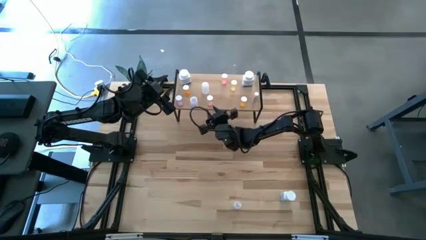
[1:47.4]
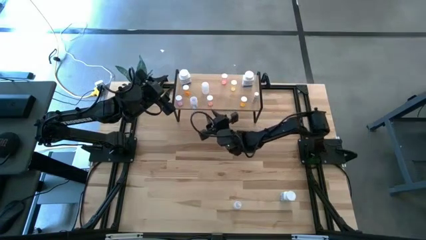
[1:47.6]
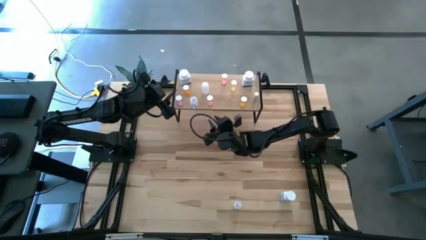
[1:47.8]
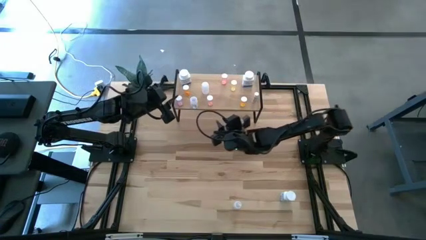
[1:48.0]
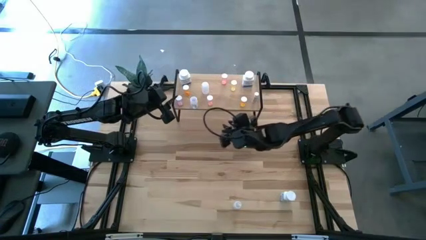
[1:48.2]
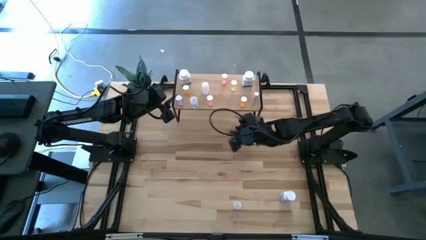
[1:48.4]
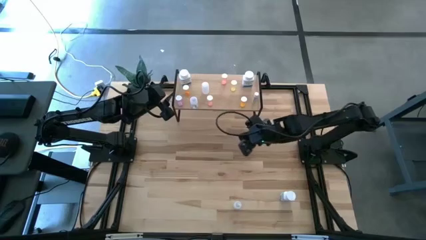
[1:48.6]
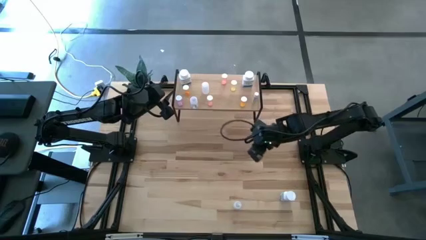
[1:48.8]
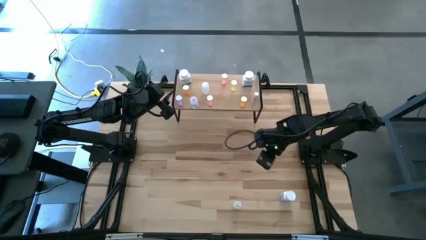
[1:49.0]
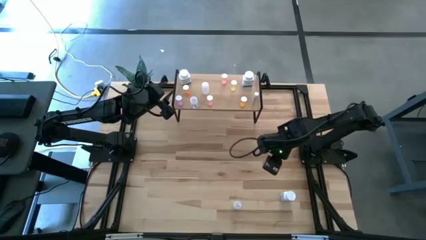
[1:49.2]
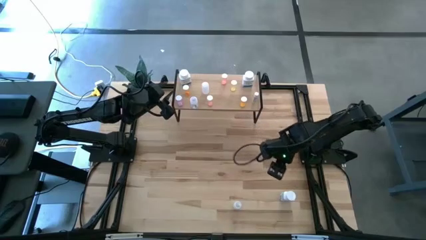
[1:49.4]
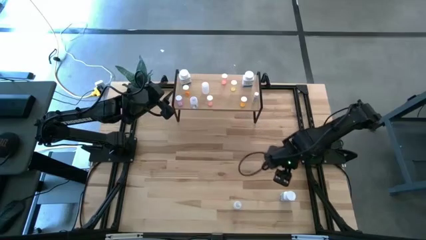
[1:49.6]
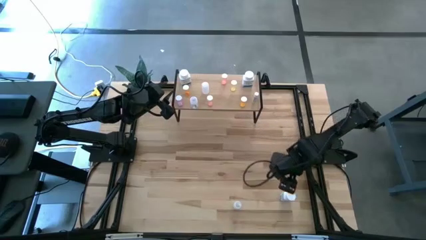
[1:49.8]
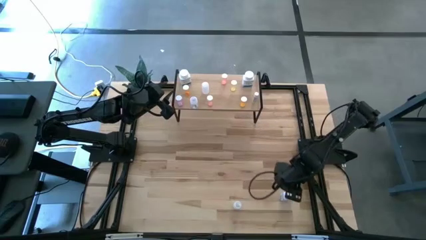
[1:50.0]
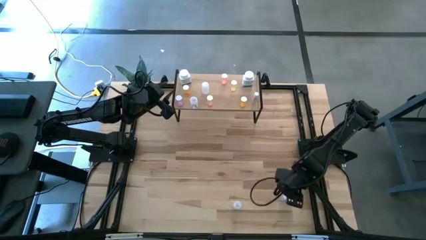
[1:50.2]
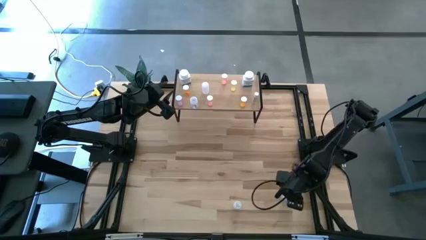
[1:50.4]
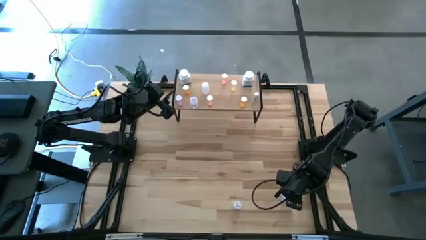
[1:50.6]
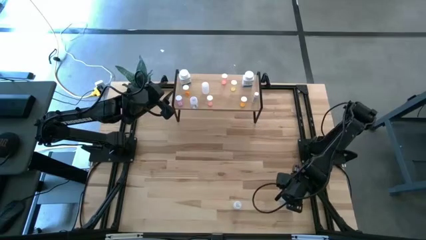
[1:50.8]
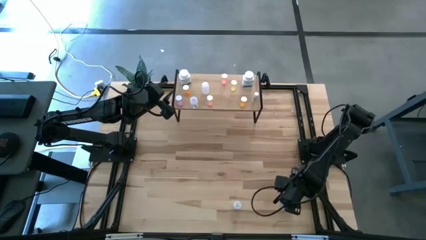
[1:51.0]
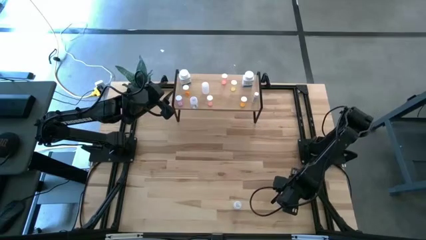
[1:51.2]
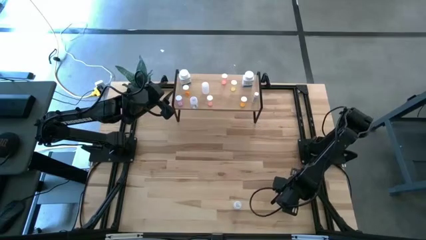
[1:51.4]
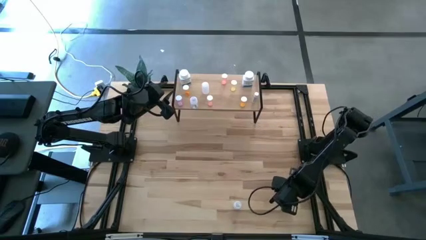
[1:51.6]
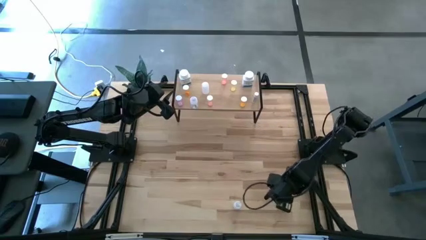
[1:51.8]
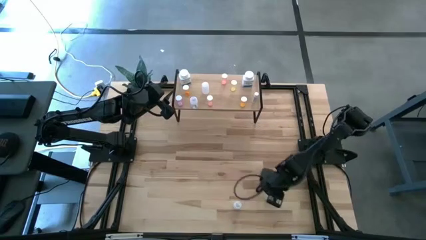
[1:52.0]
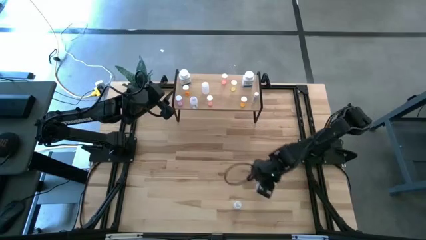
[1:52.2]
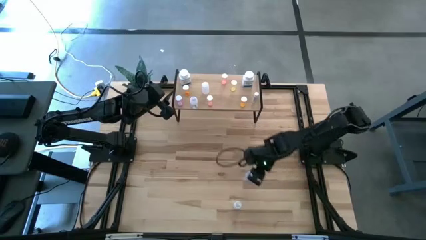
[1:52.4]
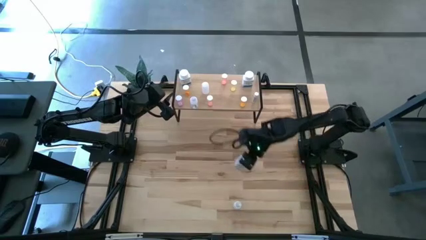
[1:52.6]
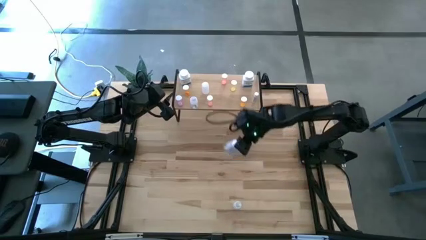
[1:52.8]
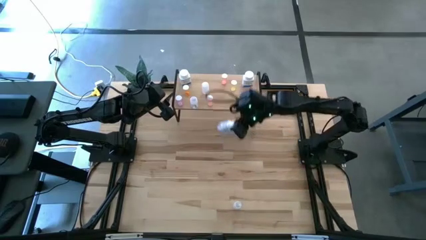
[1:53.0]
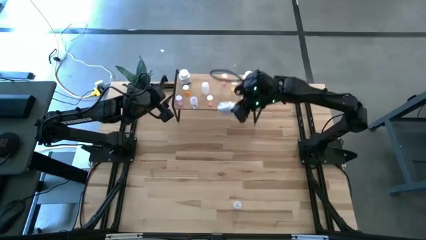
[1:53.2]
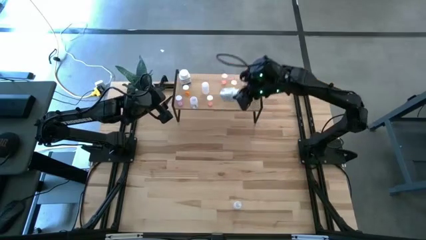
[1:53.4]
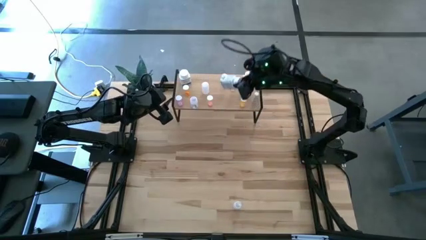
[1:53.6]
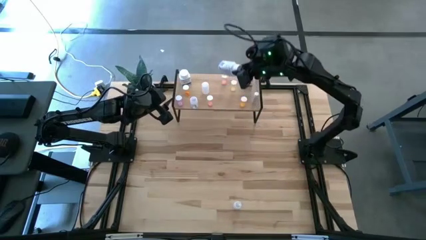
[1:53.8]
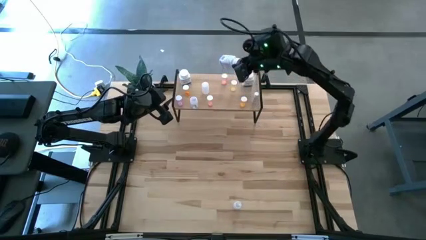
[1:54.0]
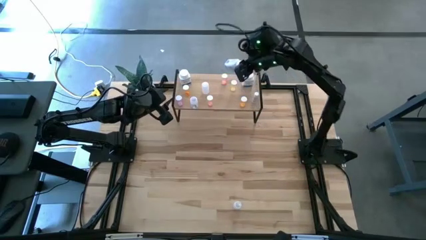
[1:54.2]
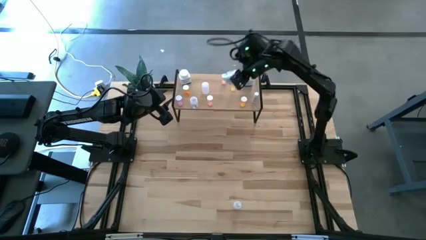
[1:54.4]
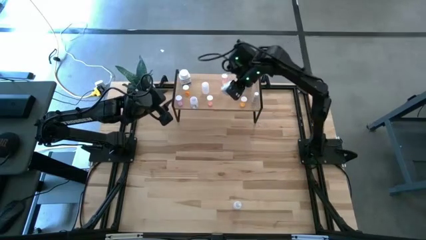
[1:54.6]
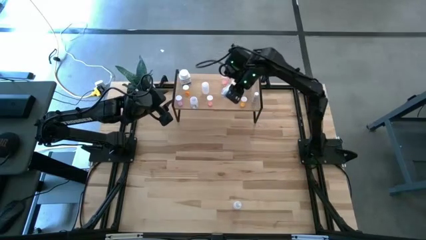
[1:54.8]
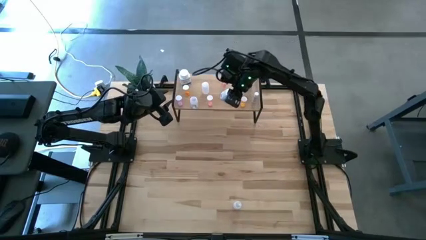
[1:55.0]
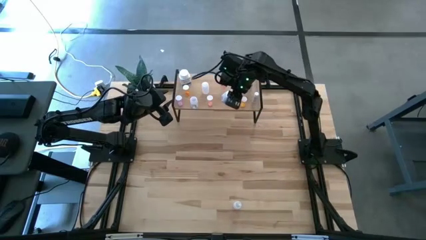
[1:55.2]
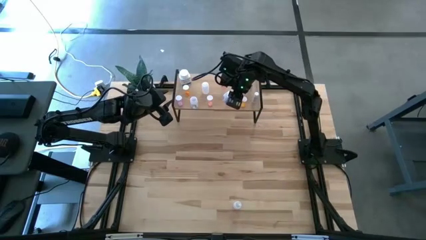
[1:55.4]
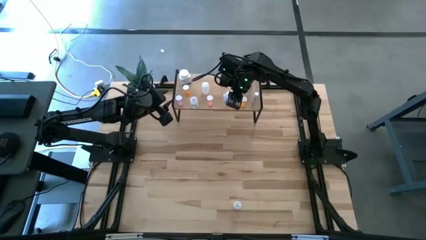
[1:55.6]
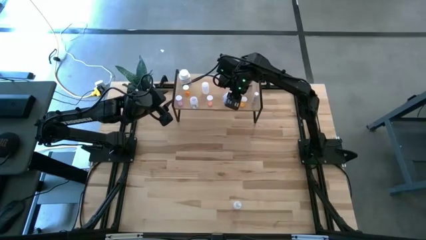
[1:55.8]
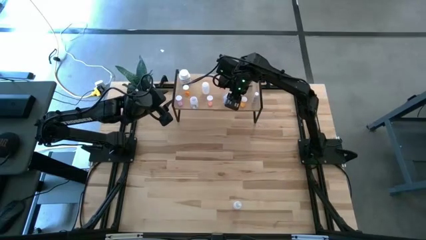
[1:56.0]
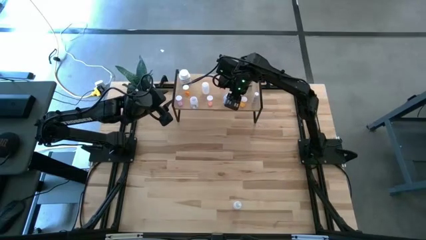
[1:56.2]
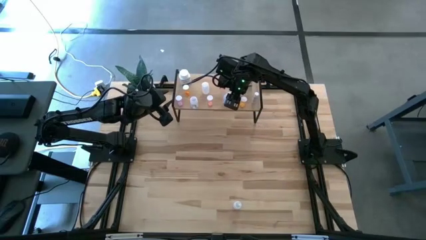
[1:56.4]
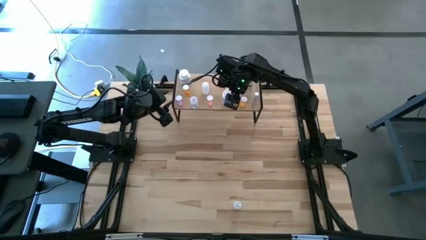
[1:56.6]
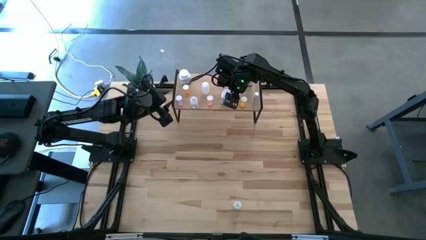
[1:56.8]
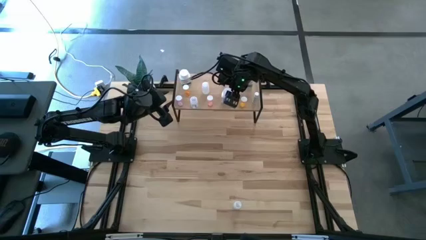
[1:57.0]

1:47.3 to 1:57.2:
Task: Pick and place medicine bottles onto shelf by color
Put the blue pill bottle on the shelf

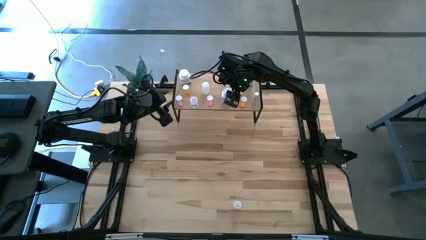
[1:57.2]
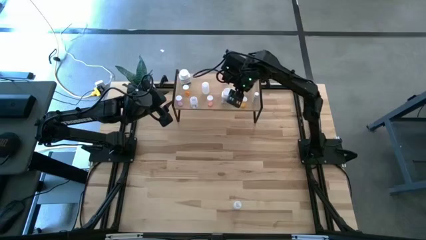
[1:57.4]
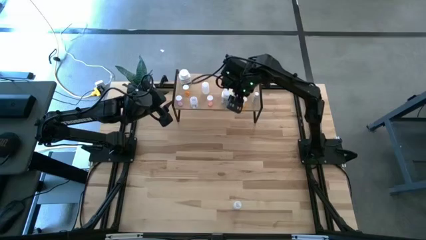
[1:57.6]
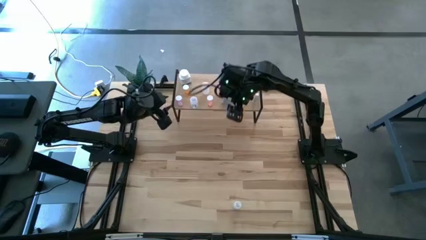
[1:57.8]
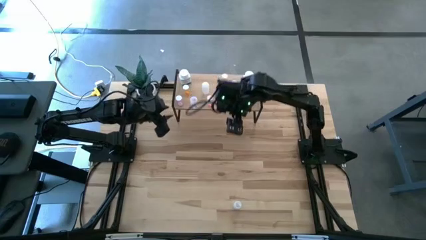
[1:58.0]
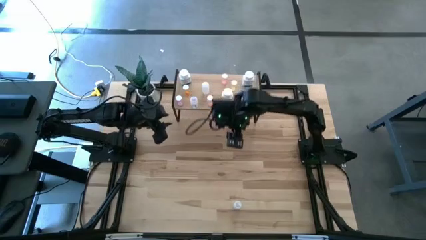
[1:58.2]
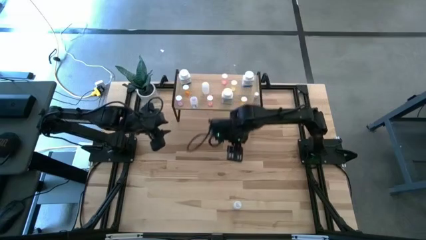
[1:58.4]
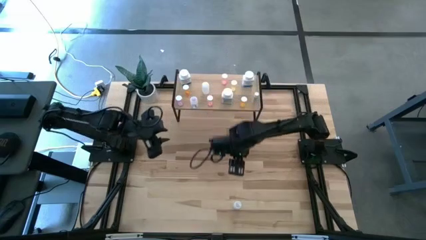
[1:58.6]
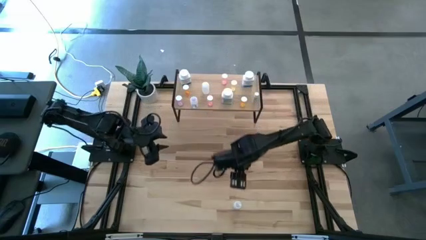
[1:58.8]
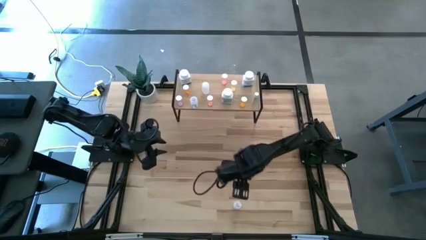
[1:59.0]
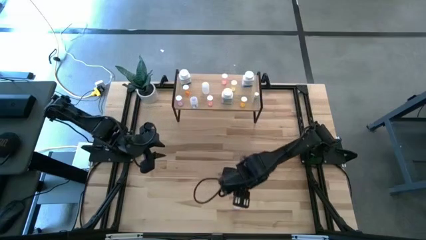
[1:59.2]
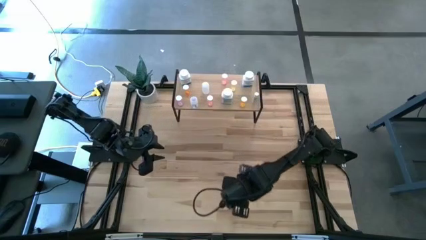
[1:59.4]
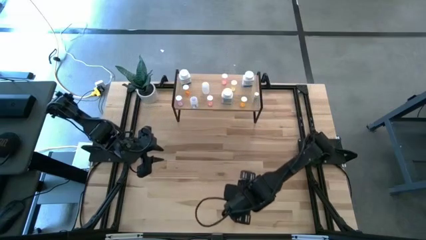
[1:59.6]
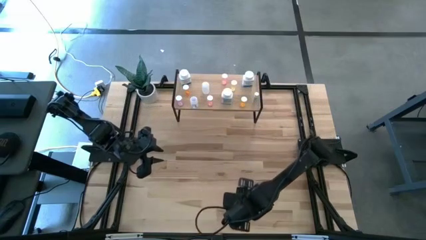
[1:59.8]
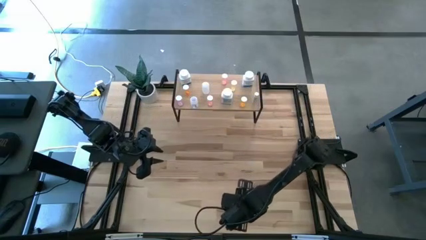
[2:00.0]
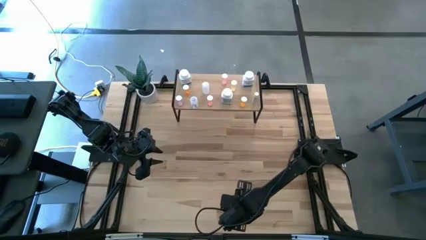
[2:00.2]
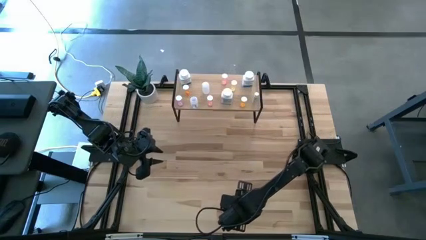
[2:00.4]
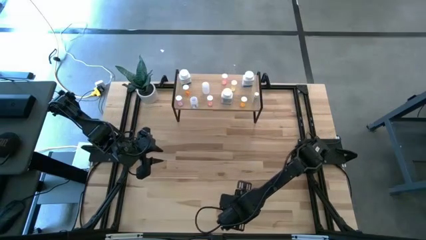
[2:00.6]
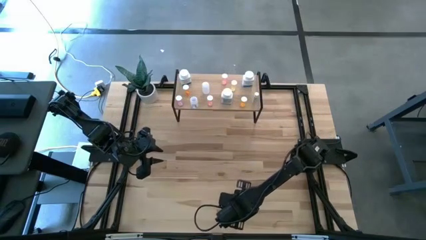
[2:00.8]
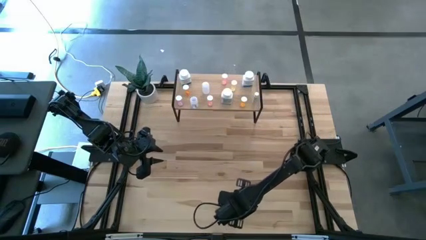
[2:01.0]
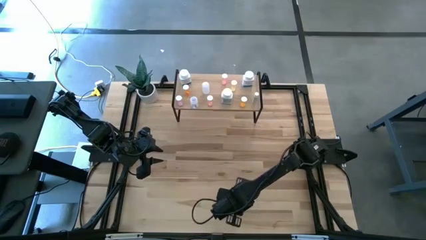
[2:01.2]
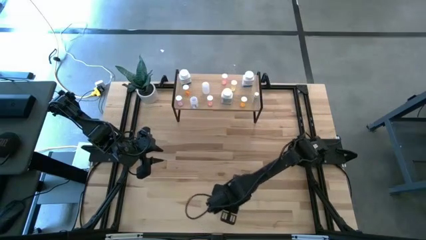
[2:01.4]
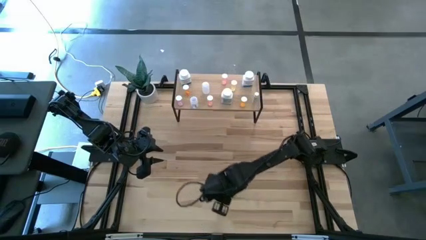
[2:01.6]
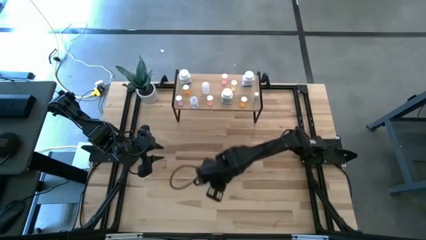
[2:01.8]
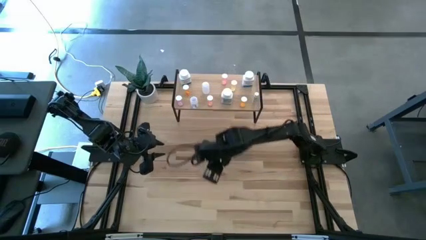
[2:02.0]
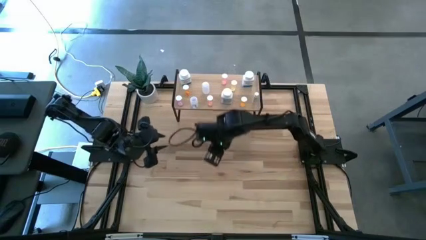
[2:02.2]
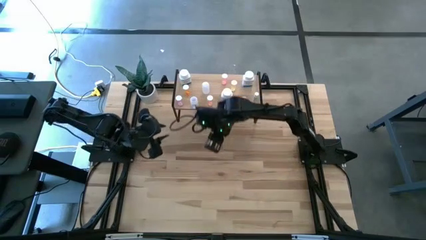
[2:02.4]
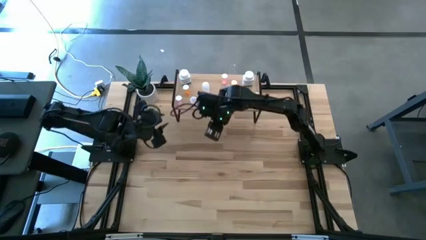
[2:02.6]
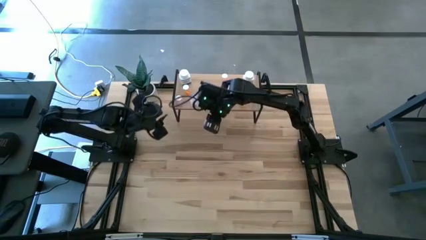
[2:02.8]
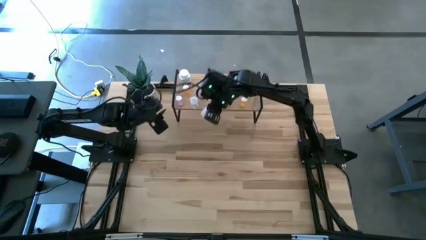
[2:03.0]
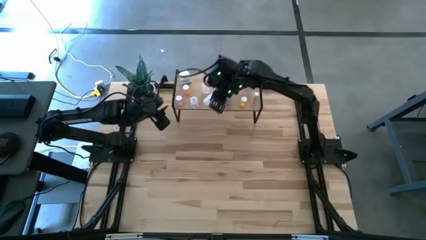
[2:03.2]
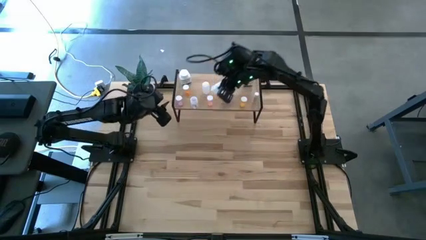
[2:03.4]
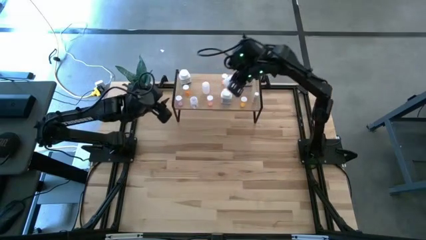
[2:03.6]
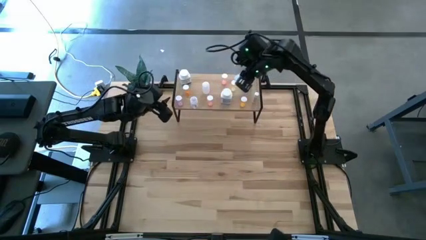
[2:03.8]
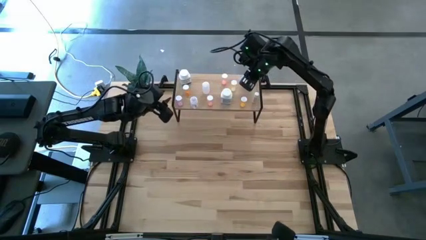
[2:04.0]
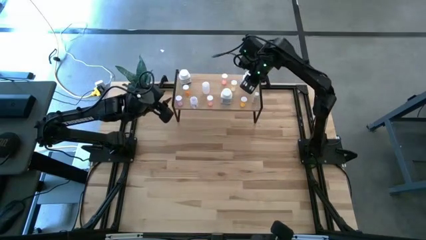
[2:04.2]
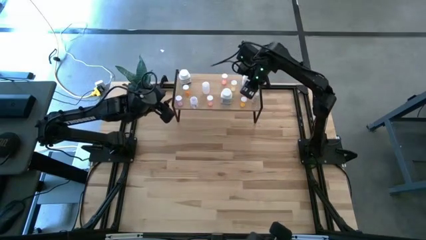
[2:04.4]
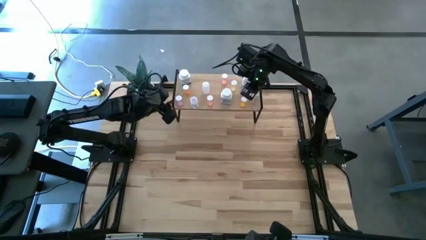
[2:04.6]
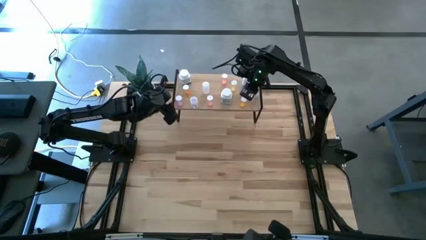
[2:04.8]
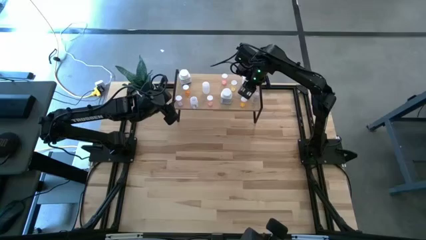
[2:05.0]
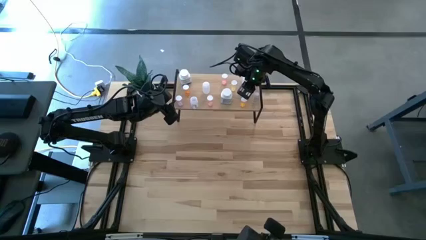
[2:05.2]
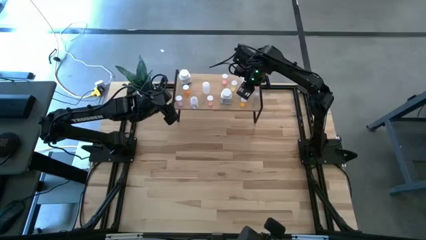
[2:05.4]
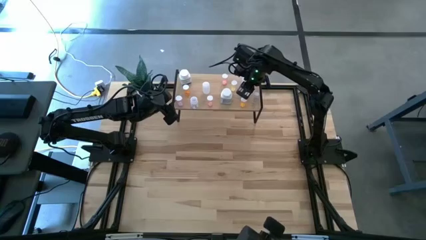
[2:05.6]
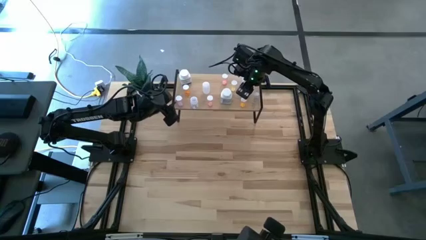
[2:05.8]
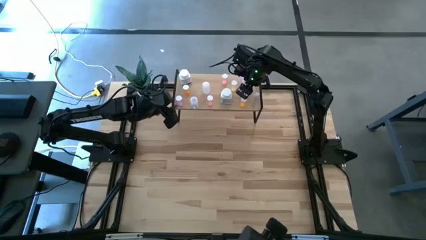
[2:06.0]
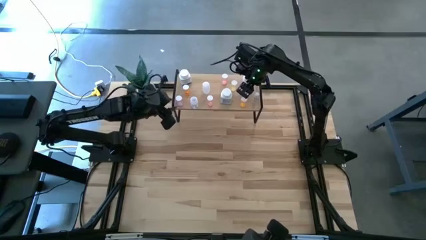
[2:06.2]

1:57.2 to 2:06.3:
Put the white transparent pill bottle on the shelf
